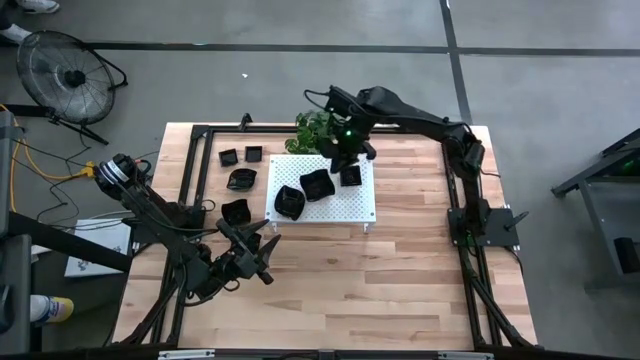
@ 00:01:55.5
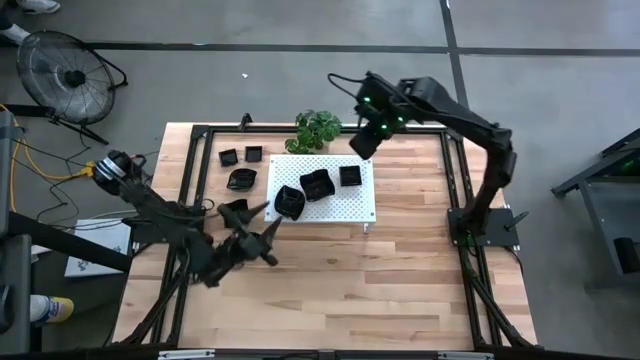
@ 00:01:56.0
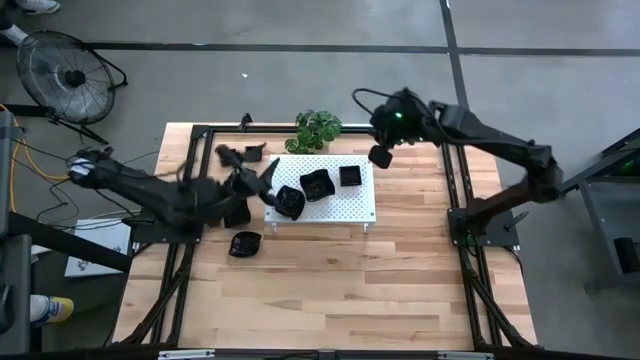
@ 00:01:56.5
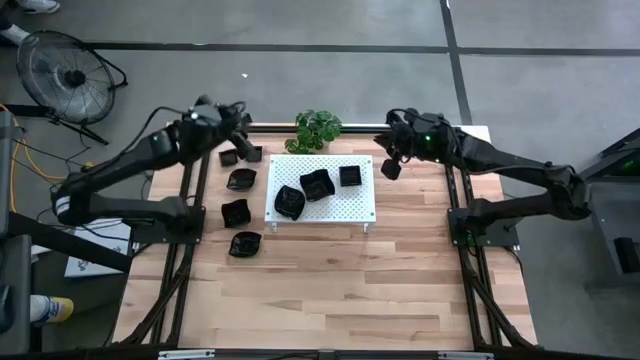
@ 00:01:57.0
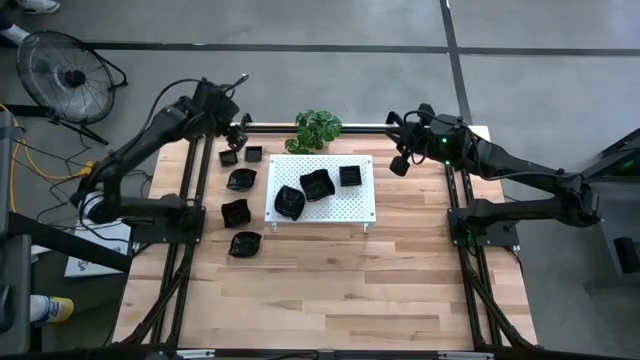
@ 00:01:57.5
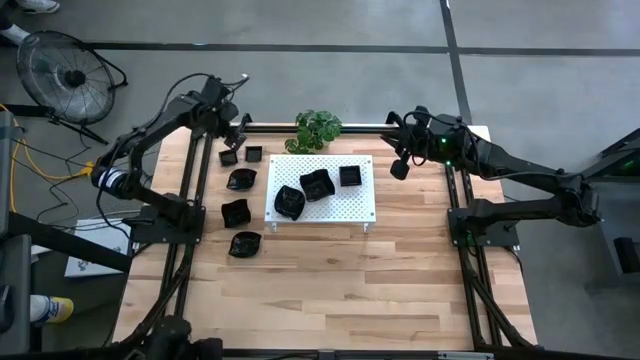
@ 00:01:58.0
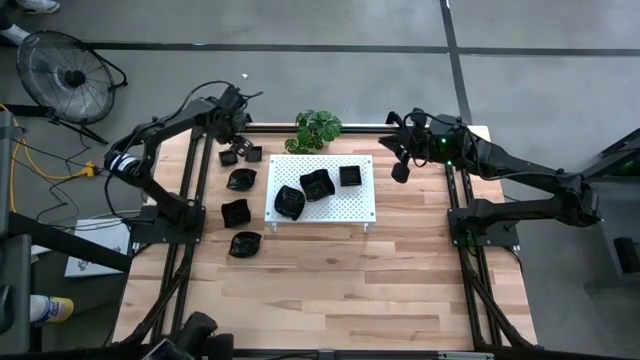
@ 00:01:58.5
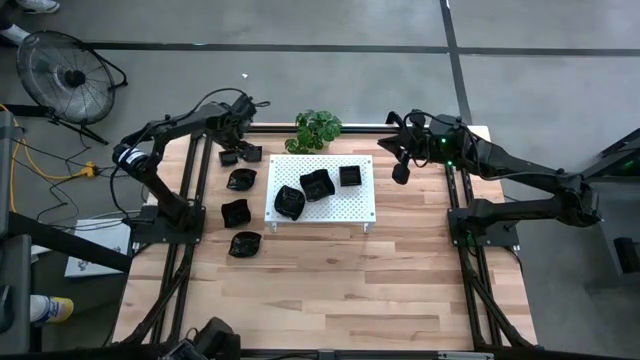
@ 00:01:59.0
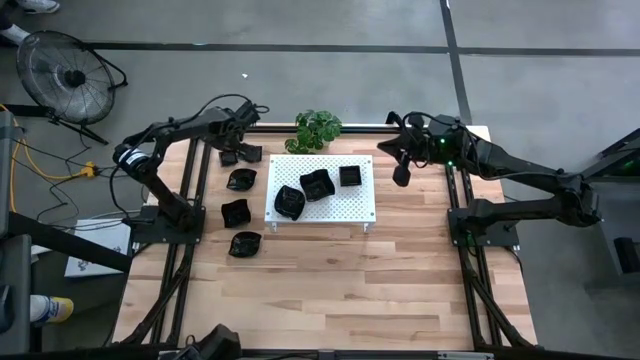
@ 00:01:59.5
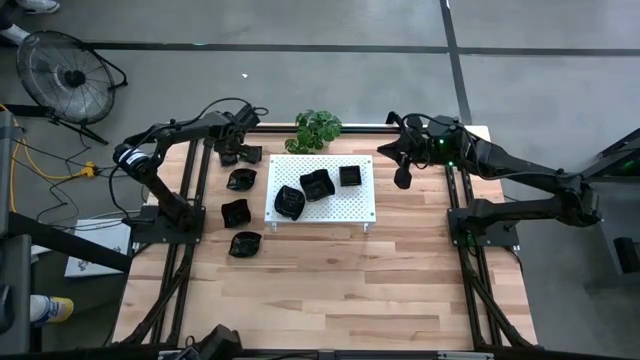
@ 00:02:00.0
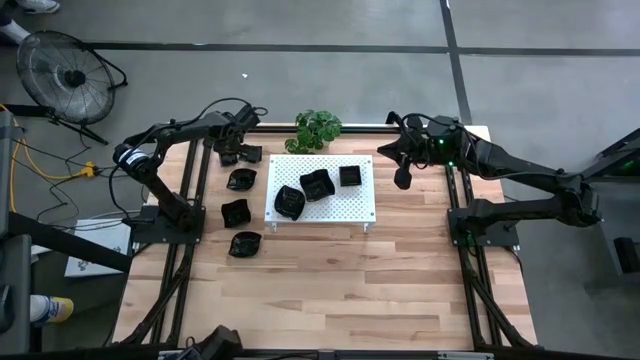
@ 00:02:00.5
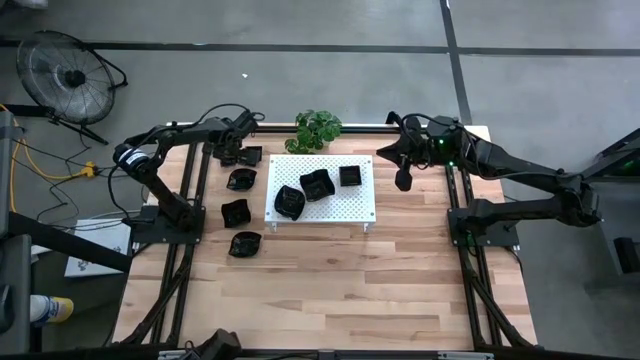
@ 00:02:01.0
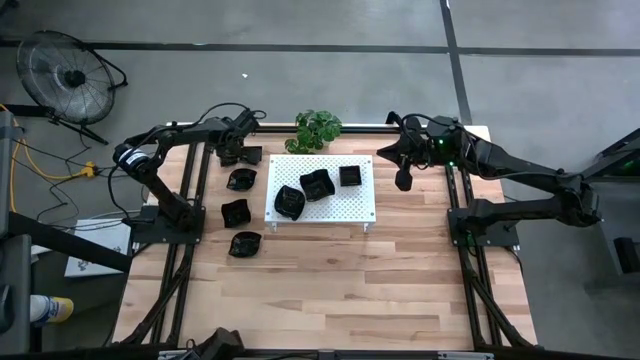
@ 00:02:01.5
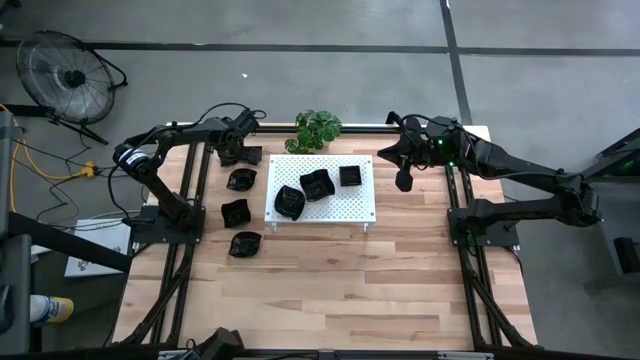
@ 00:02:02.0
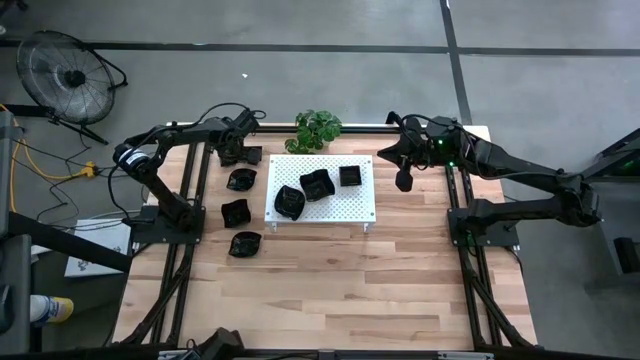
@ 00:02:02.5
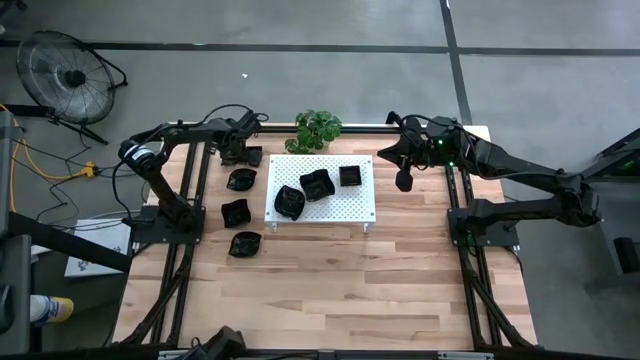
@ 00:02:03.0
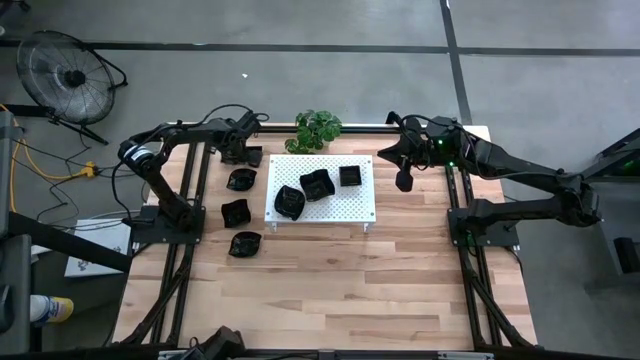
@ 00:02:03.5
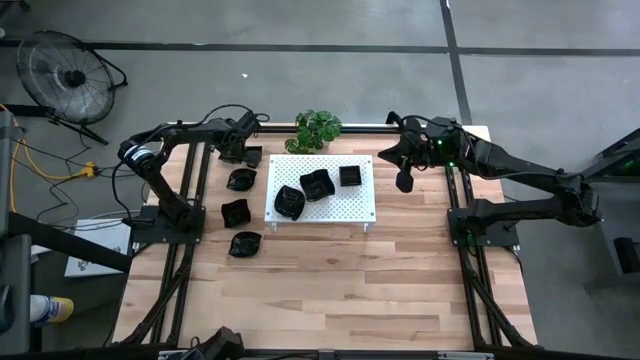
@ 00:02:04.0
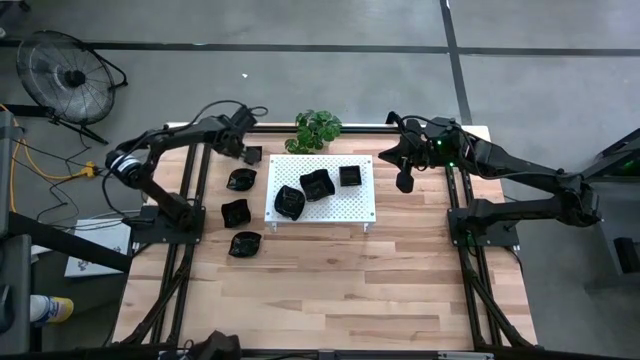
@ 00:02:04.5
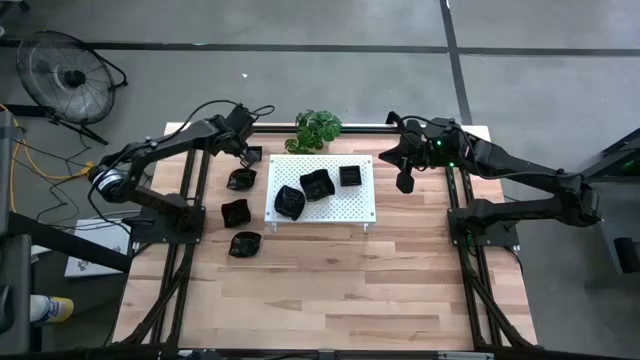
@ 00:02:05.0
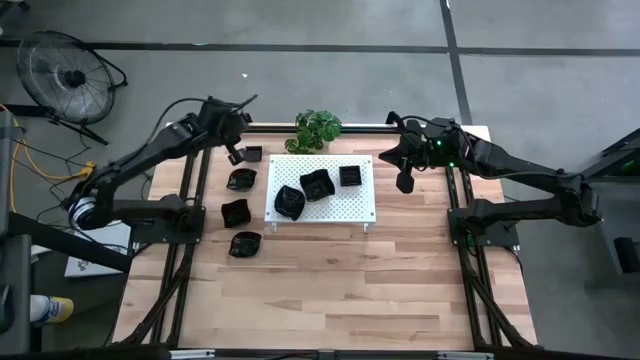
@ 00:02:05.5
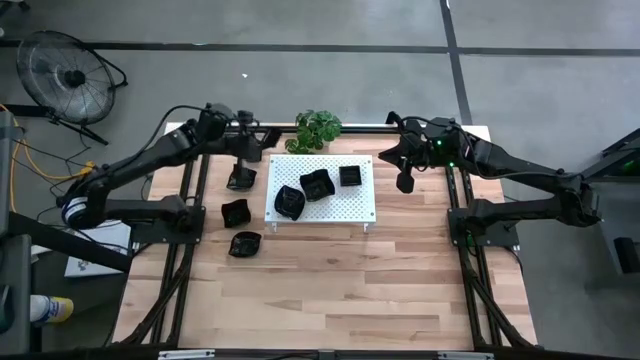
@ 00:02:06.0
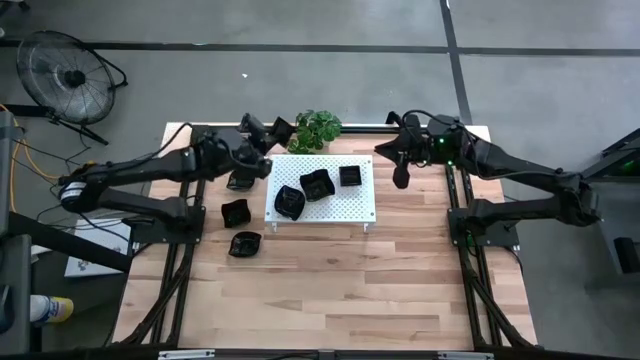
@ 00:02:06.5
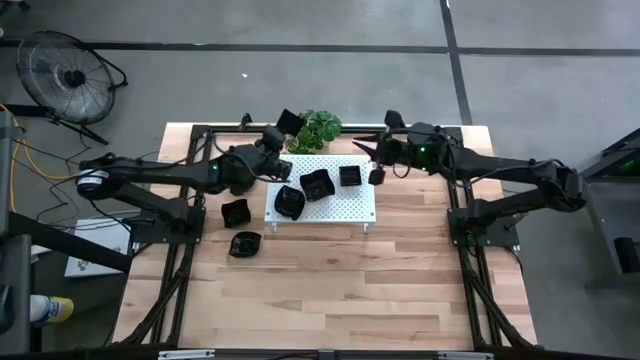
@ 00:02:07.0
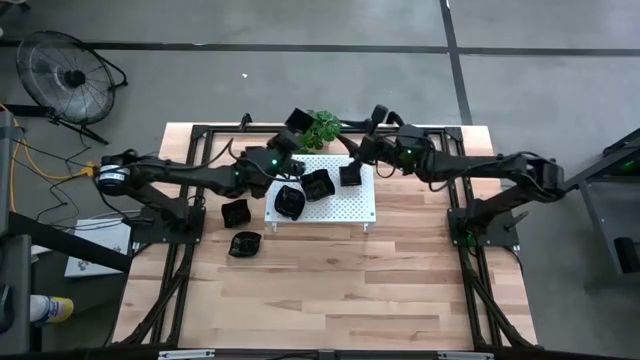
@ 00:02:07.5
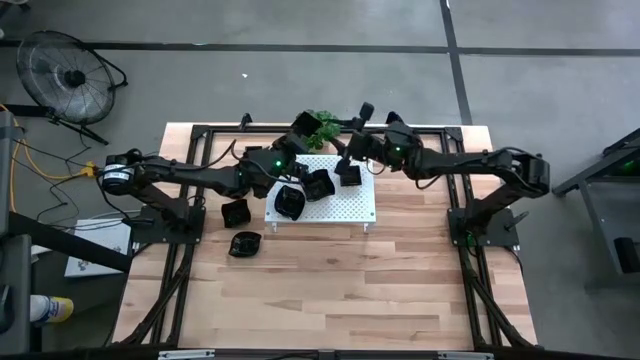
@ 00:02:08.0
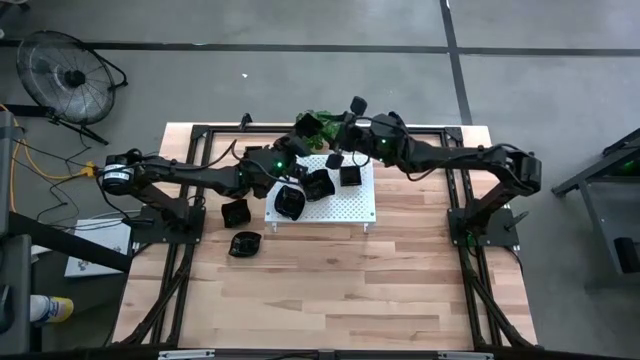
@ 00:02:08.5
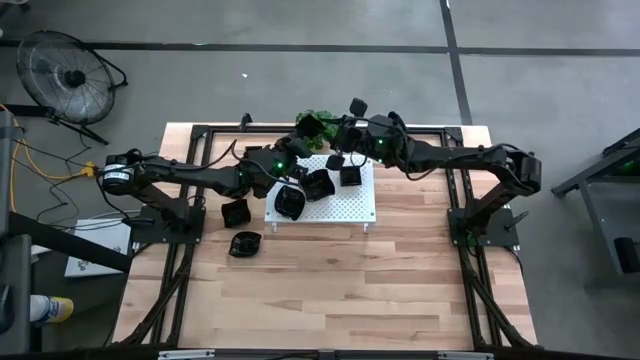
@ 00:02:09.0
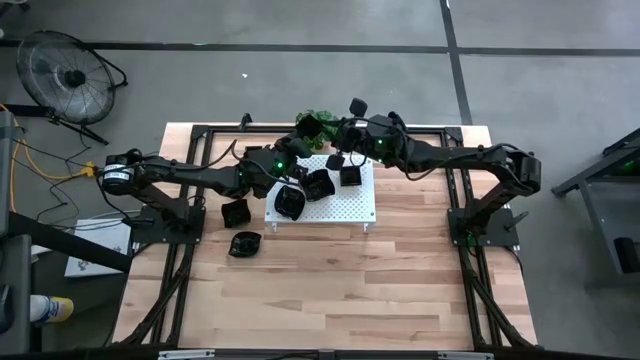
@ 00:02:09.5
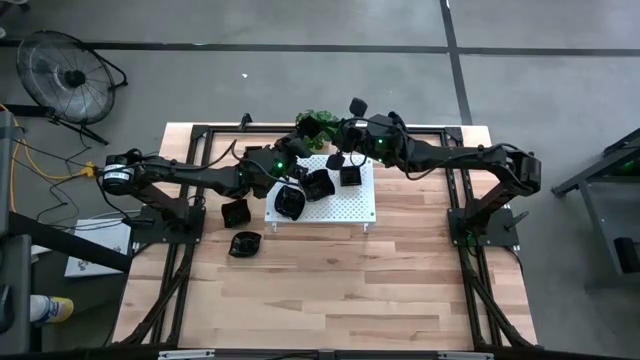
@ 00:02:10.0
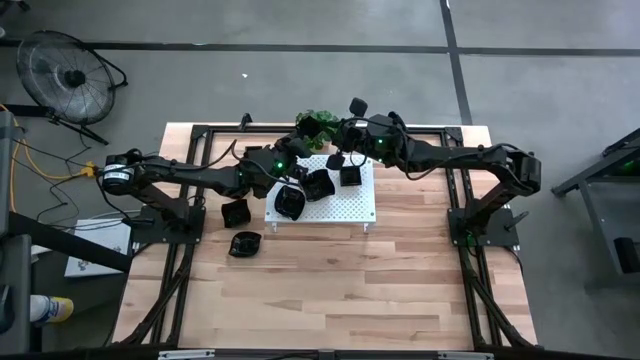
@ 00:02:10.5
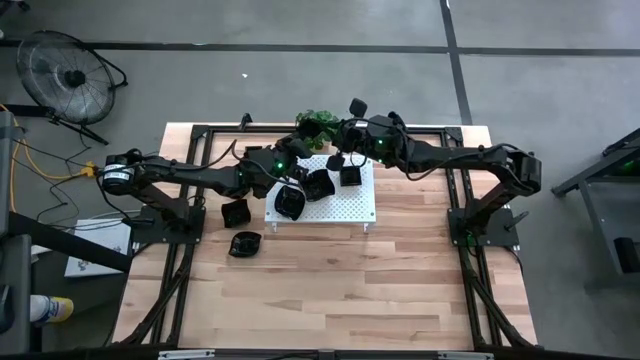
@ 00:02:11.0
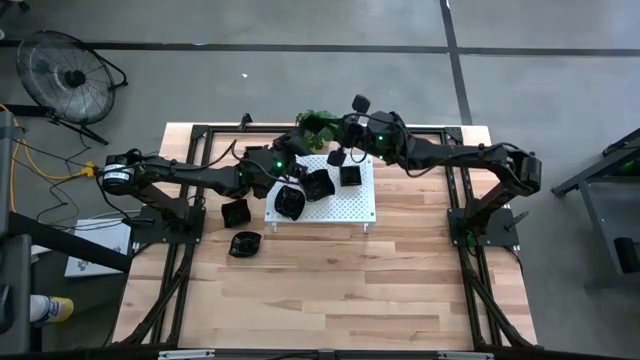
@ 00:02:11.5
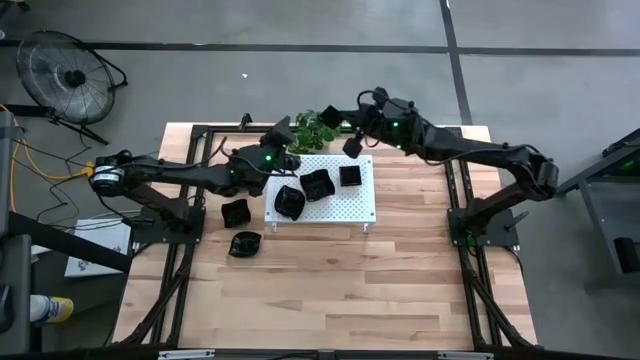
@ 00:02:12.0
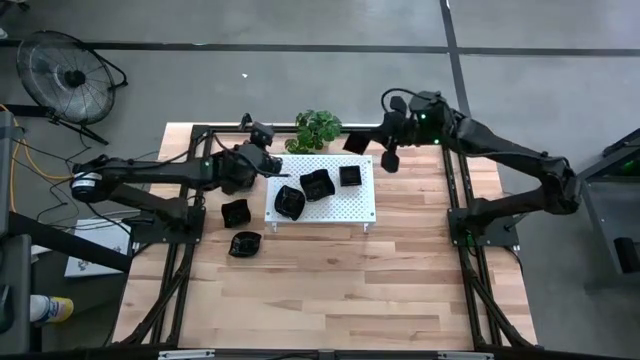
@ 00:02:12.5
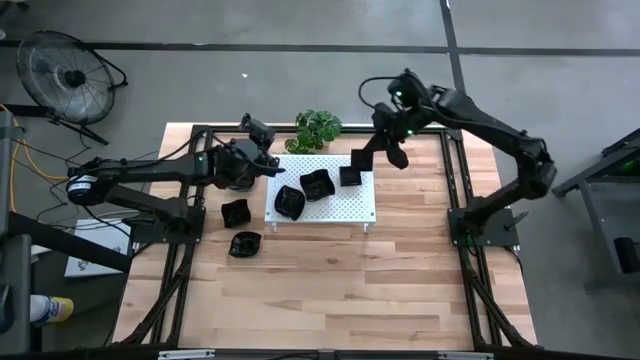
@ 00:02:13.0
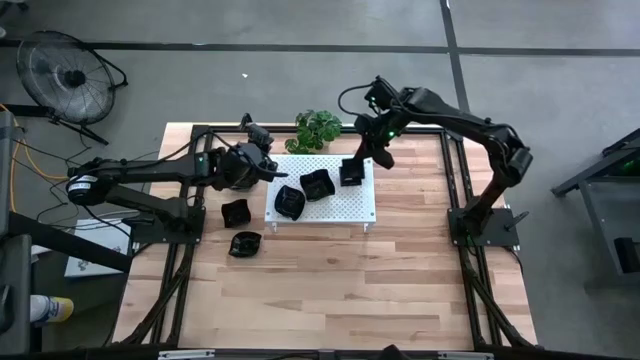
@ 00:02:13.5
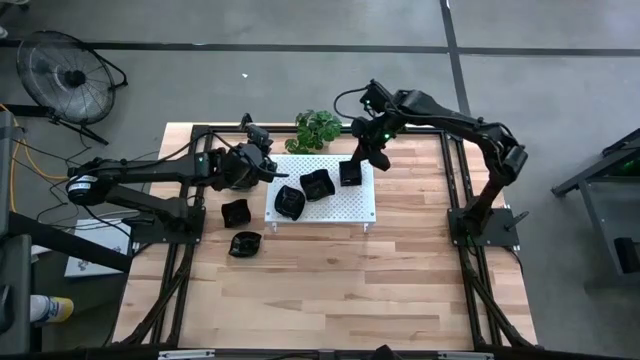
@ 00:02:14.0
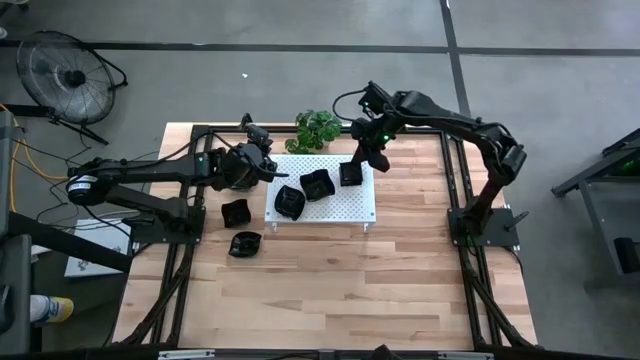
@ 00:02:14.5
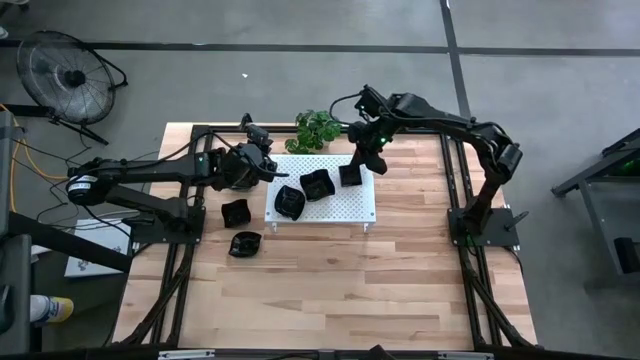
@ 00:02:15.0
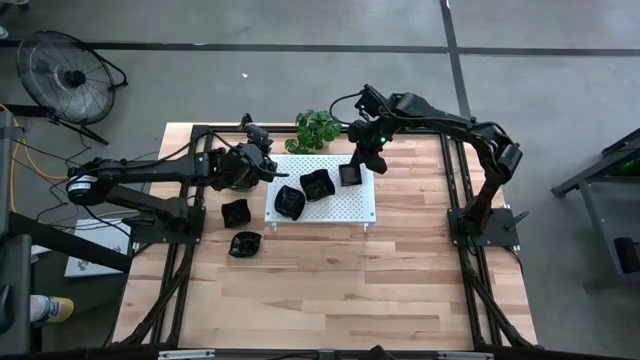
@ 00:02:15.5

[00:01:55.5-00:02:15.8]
Task: Pick & Place Mini shaped plates
Stack the square plate on top of the square plates on the shelf

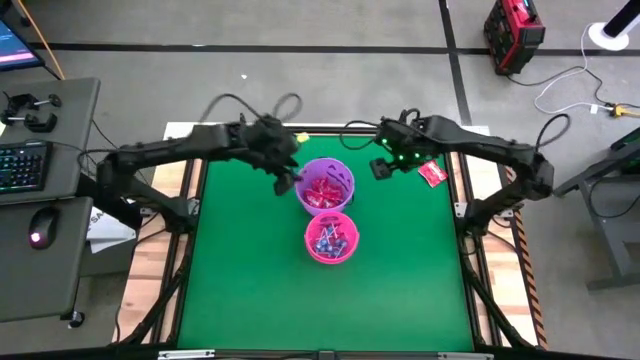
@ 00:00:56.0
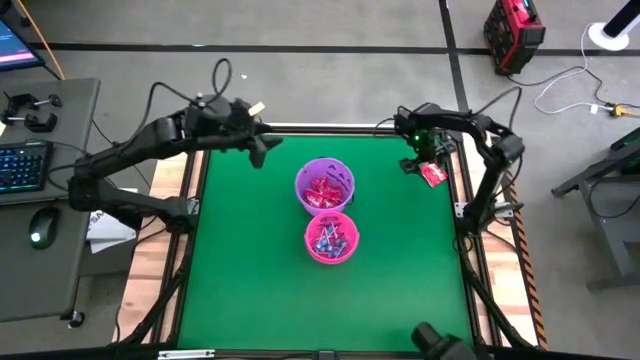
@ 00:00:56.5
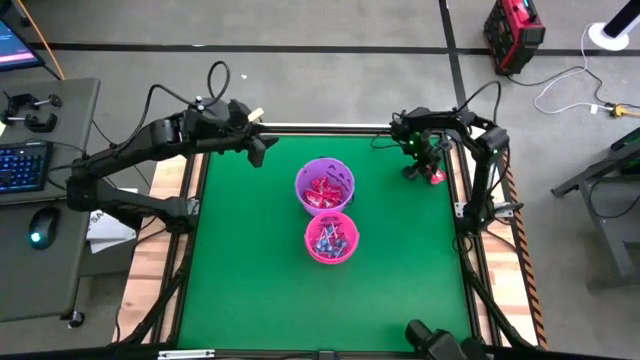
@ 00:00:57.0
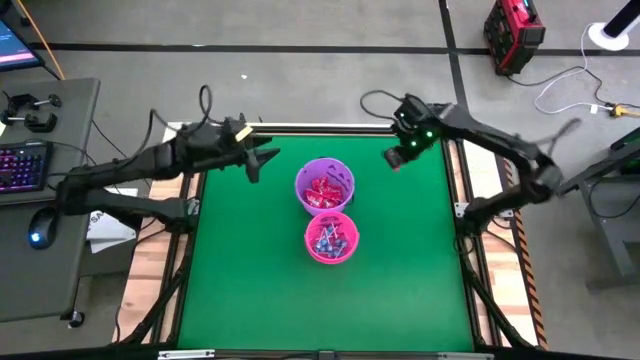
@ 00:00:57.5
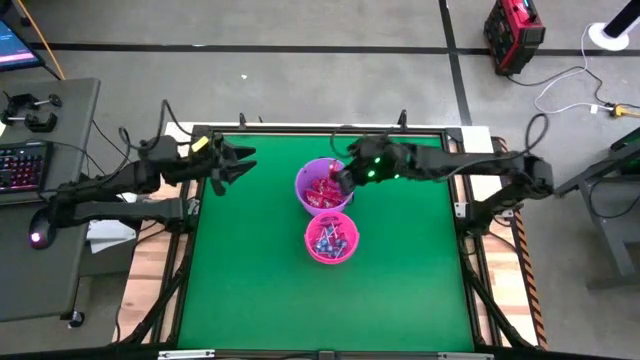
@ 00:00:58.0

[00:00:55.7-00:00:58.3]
Task: Sort candy by brand, put in halloween buckets
Put the red candy into the purple bucket
